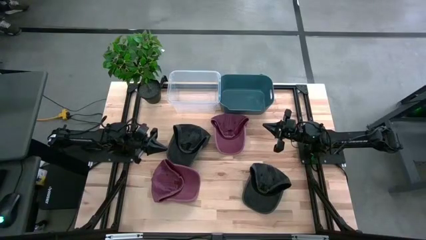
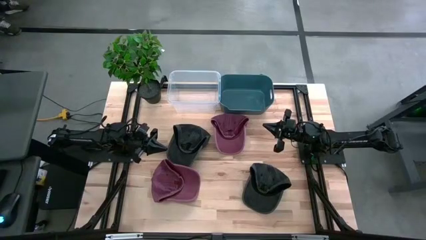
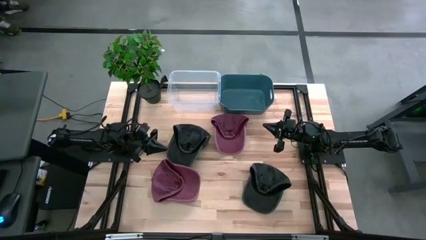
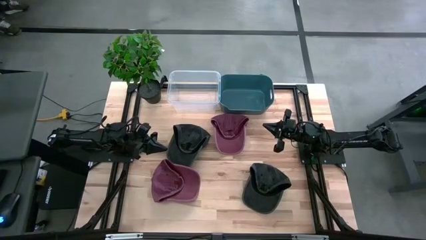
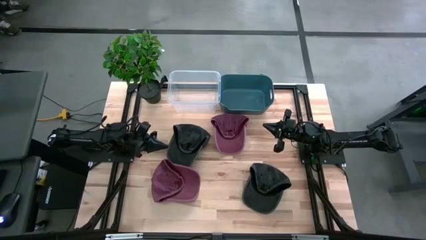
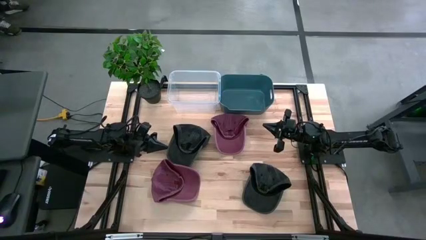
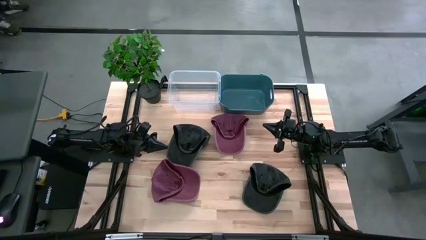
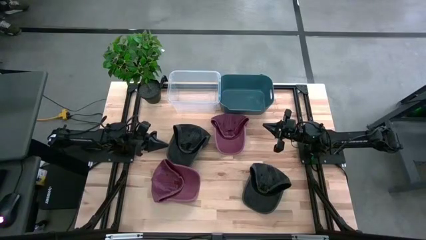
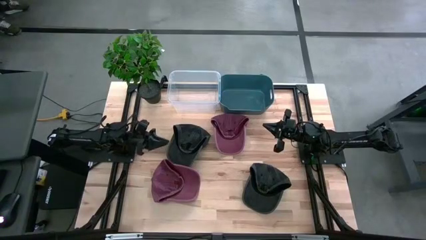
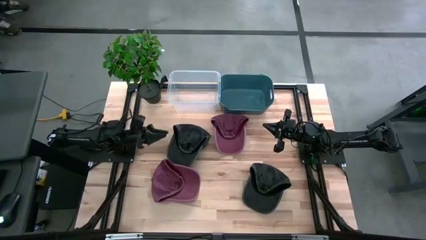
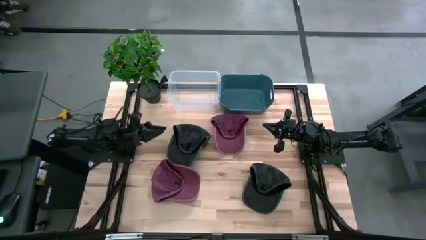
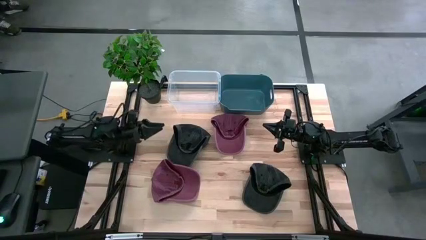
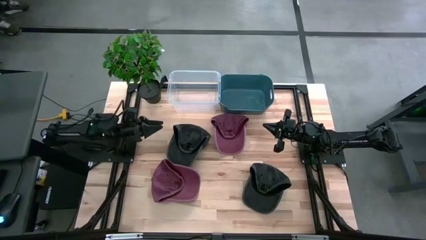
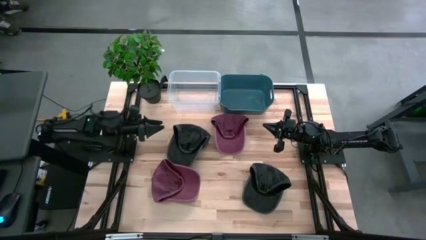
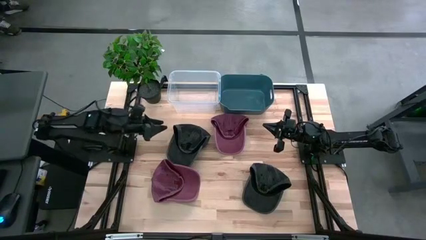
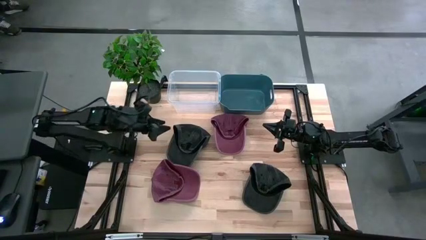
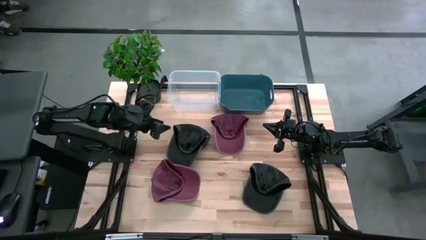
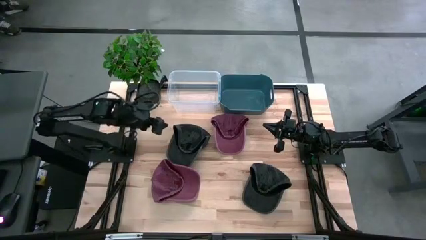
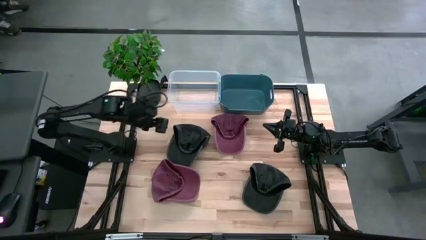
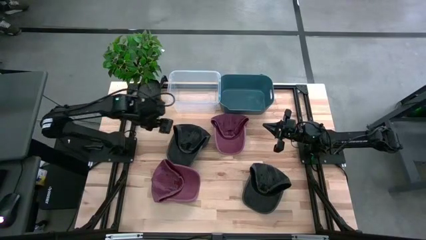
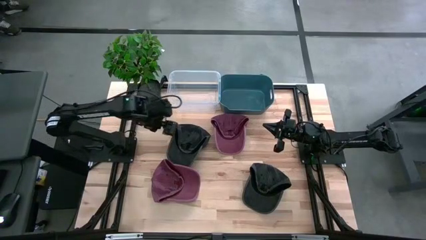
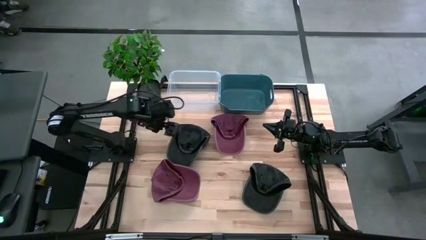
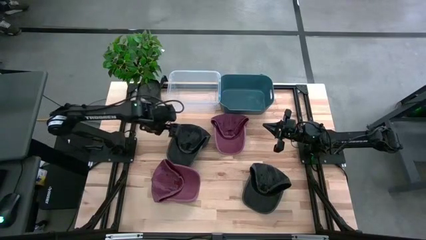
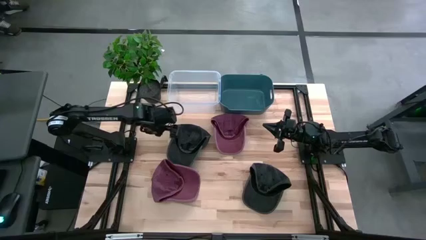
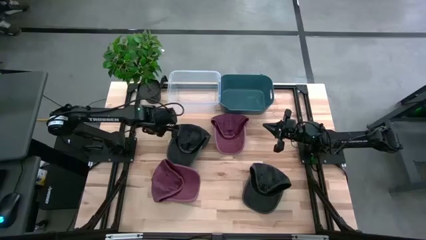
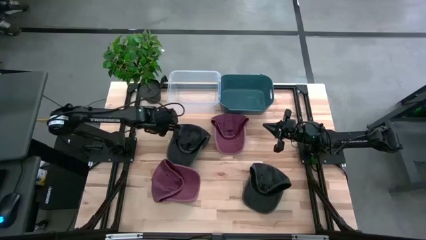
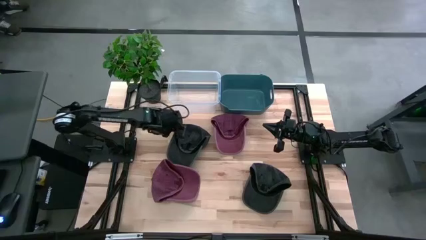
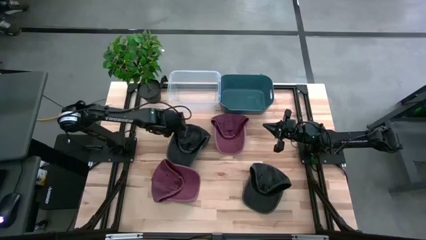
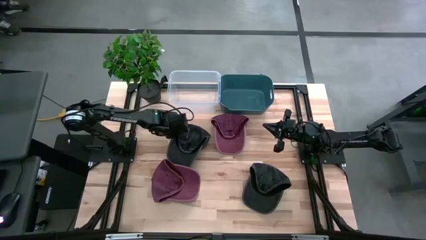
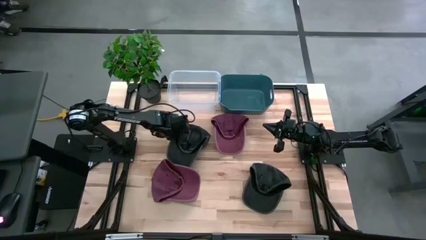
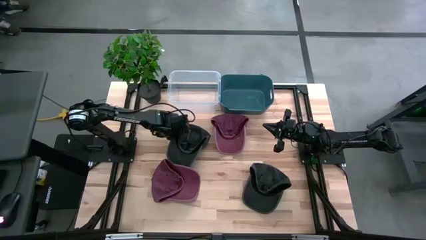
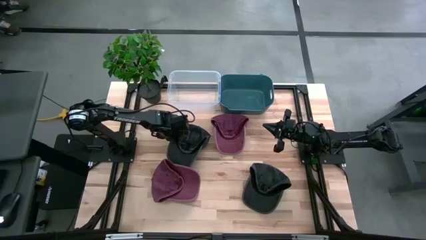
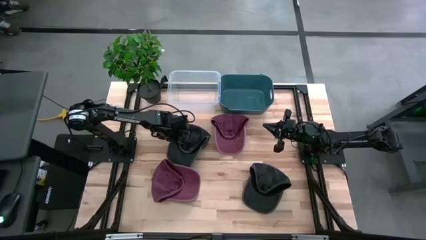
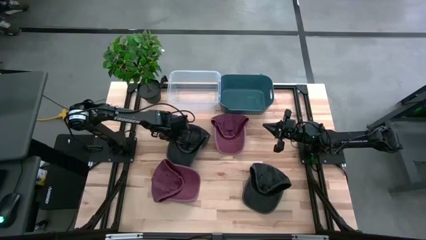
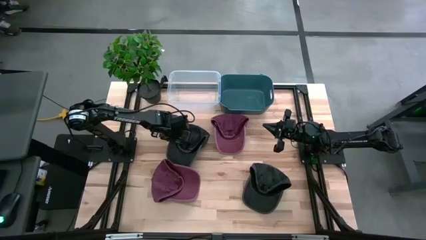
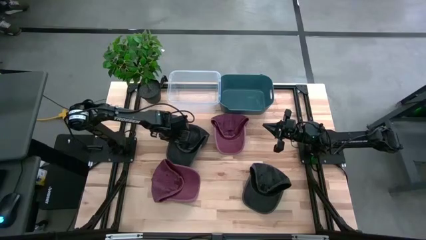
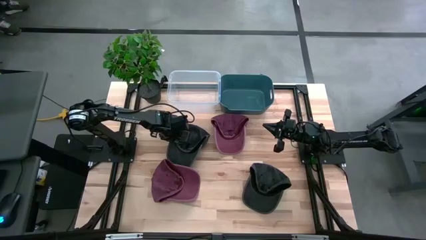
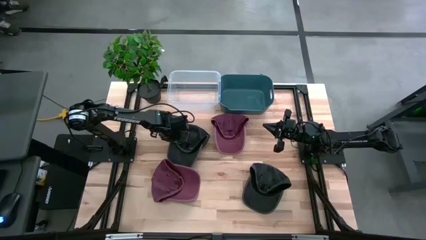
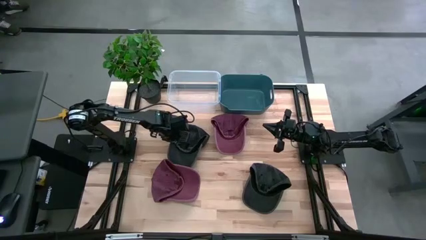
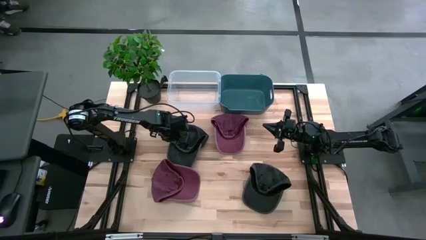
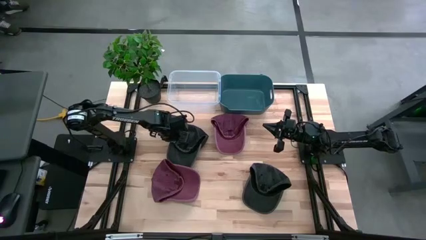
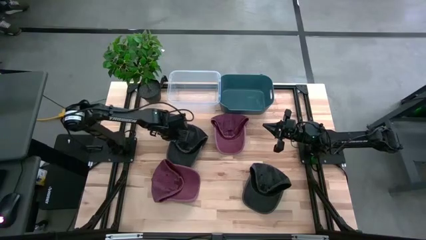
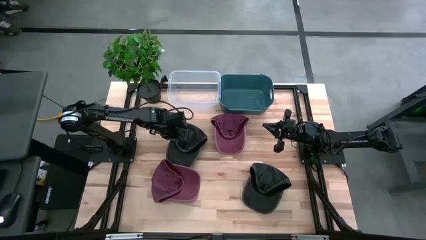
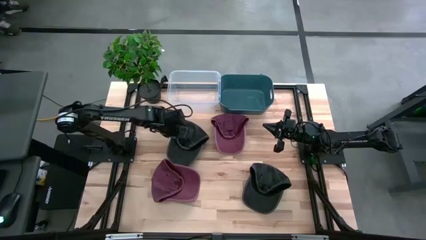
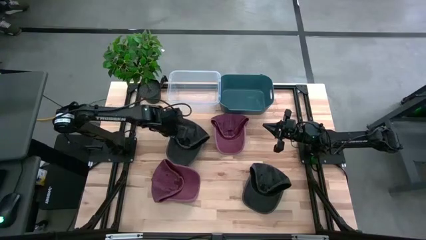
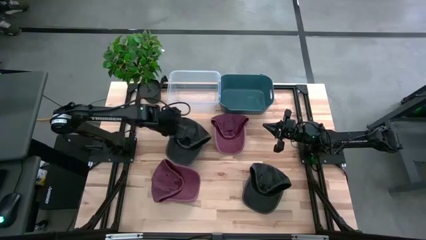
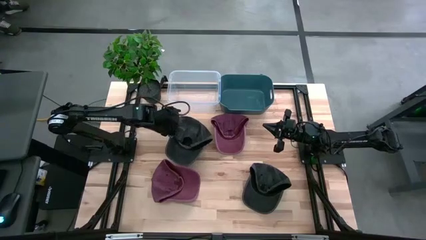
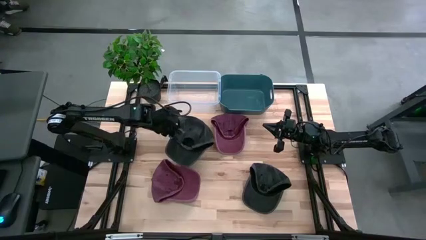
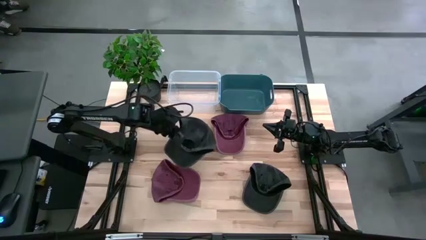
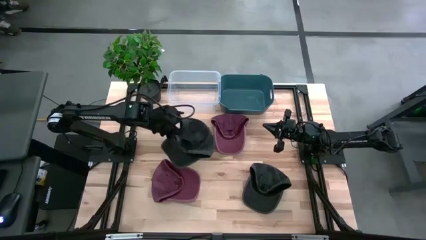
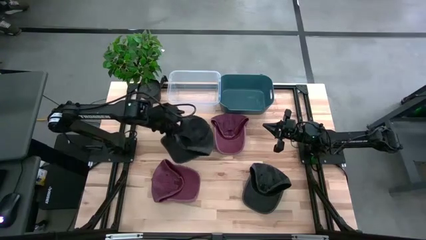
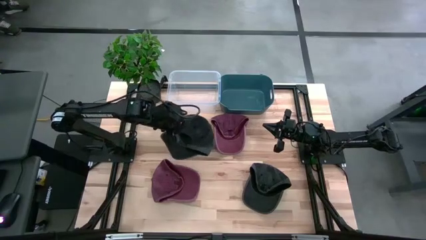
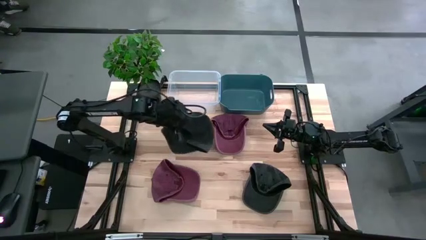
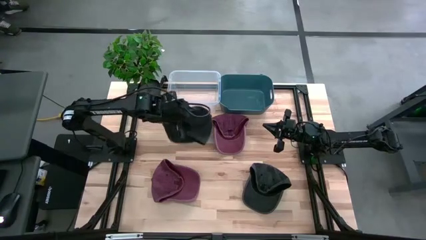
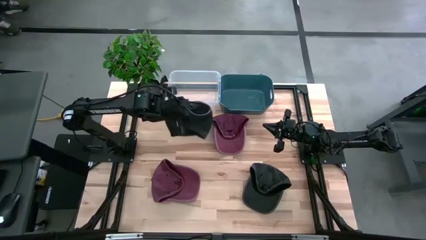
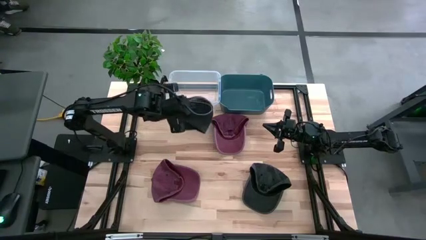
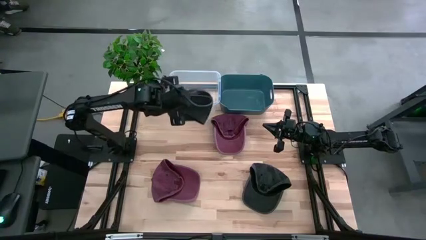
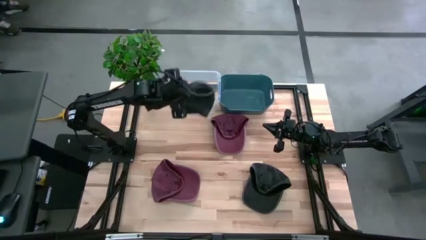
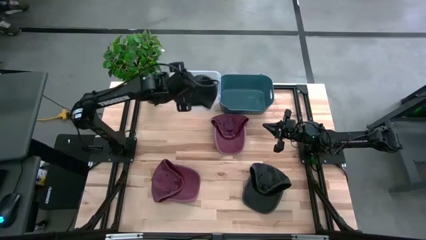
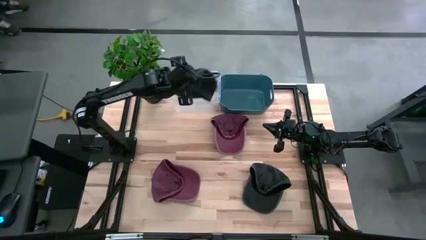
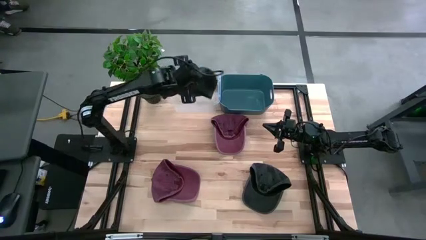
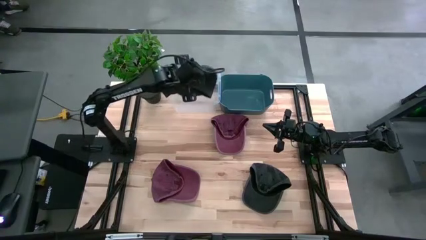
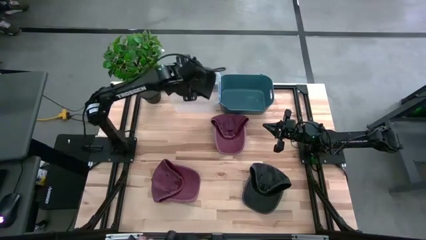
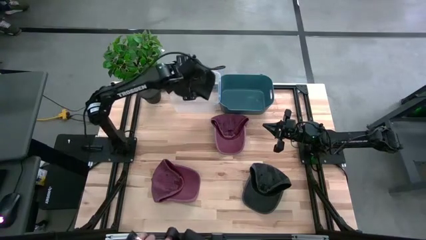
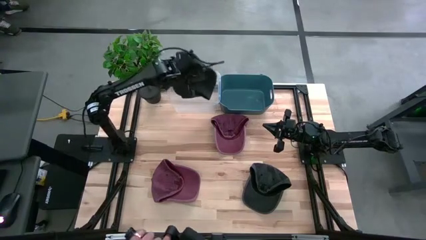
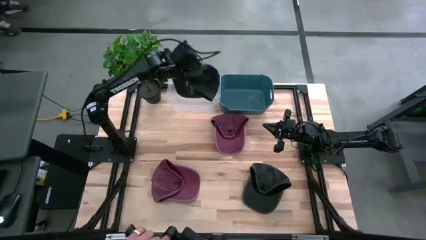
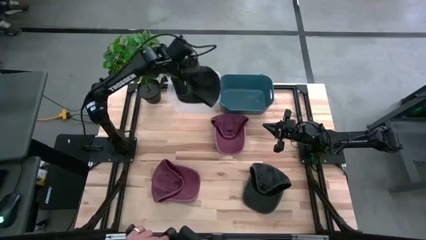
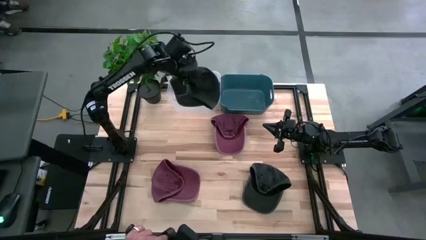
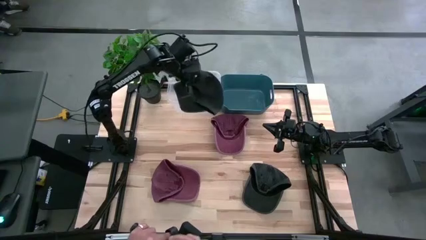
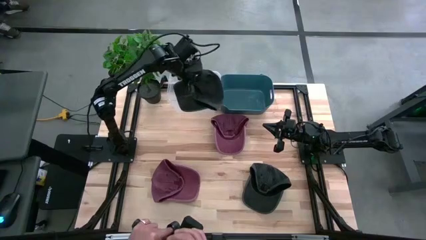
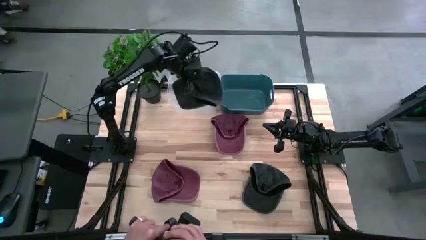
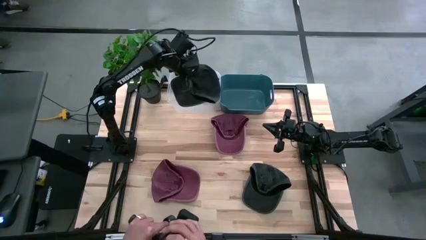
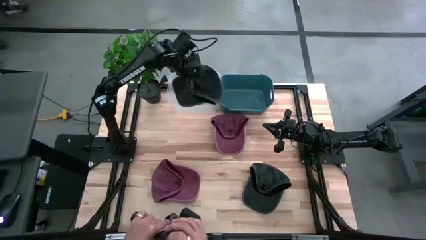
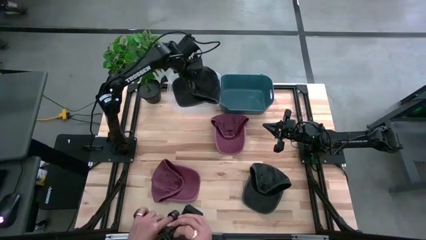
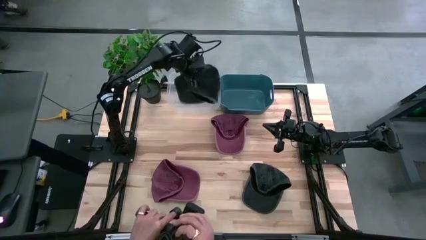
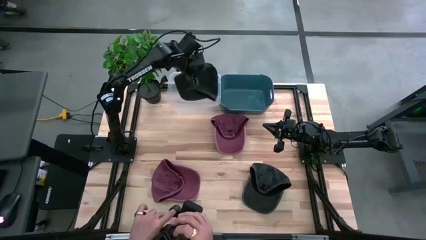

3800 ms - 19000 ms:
Task: Pick & Place hat
Put the top black cap into the transparent bin
